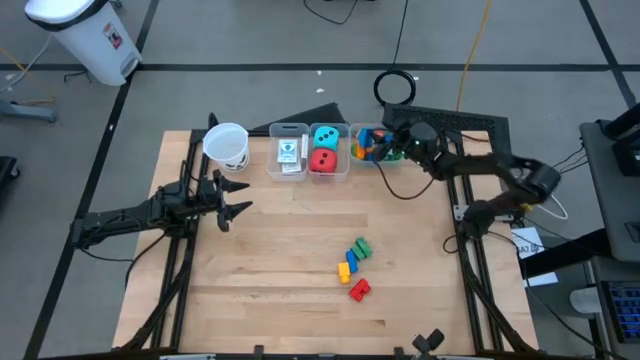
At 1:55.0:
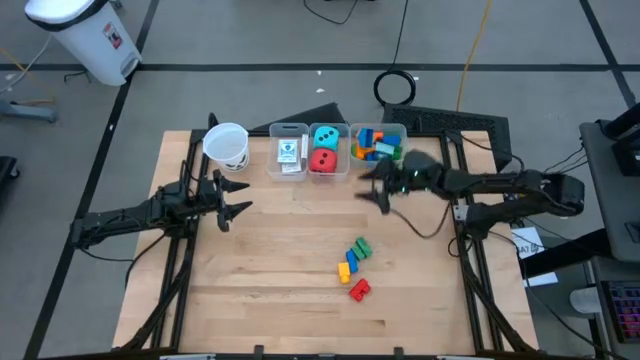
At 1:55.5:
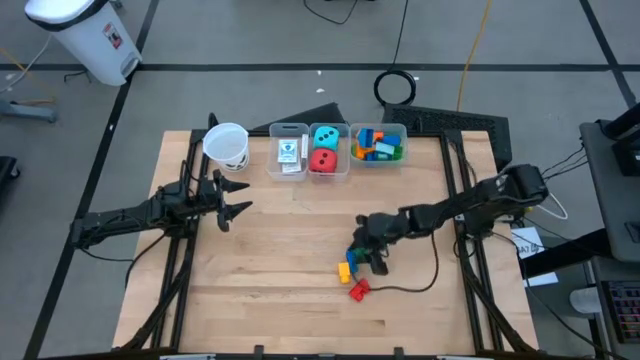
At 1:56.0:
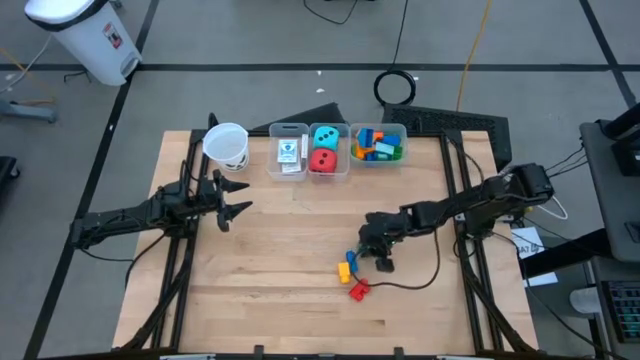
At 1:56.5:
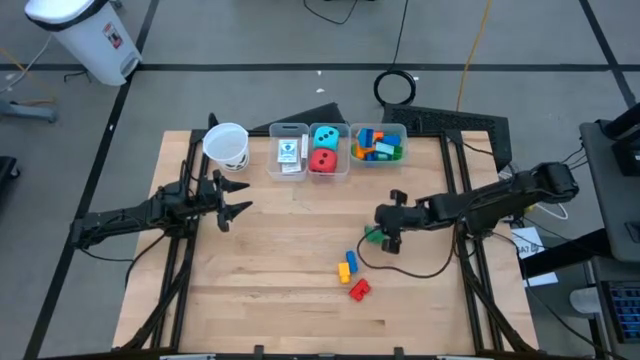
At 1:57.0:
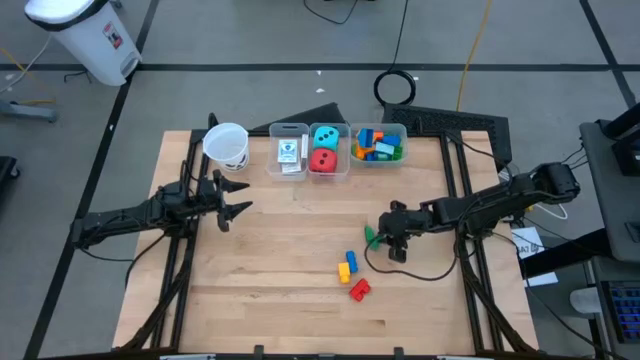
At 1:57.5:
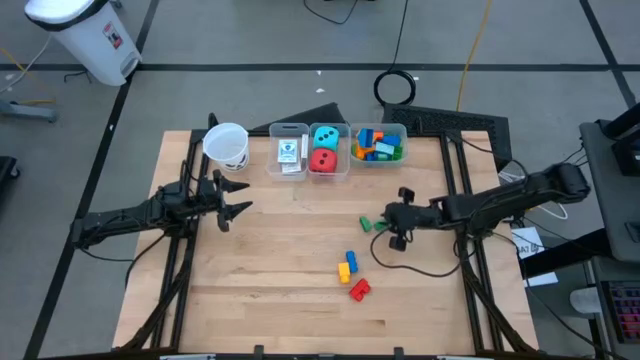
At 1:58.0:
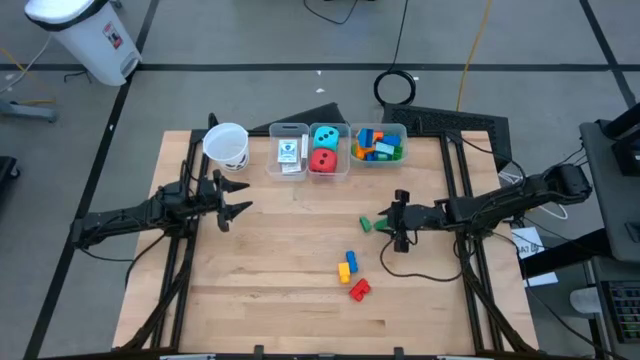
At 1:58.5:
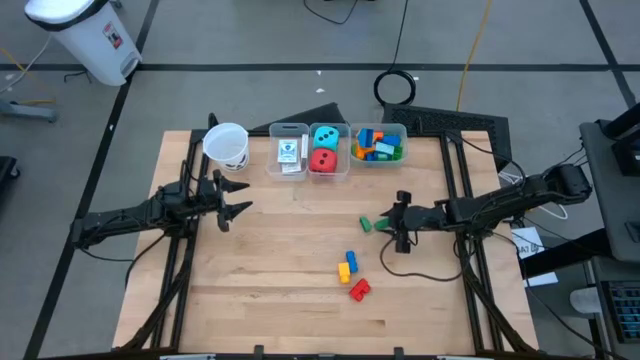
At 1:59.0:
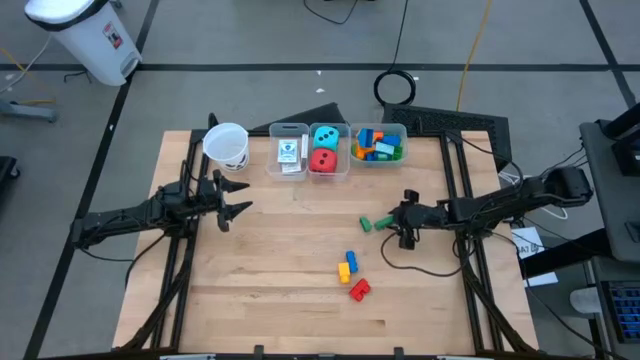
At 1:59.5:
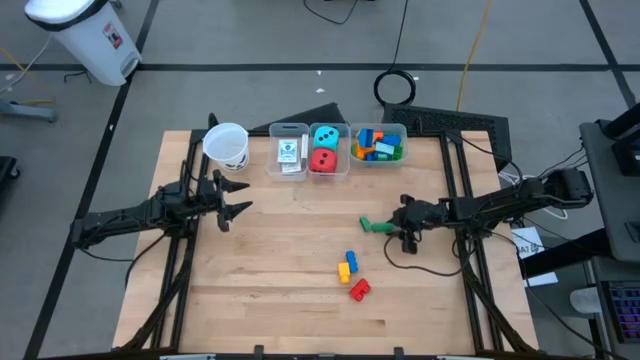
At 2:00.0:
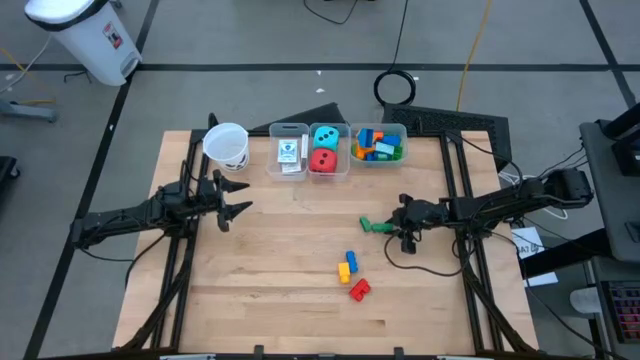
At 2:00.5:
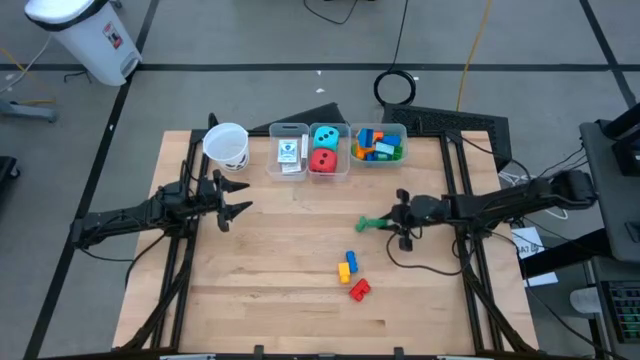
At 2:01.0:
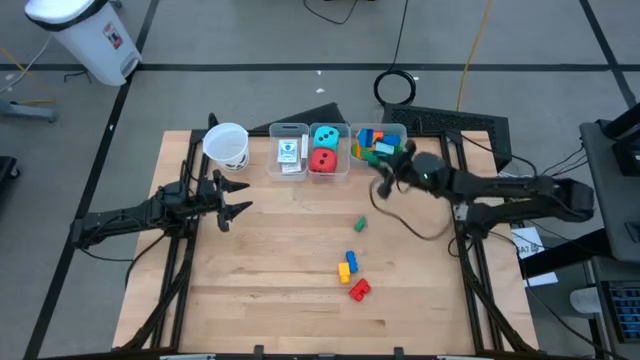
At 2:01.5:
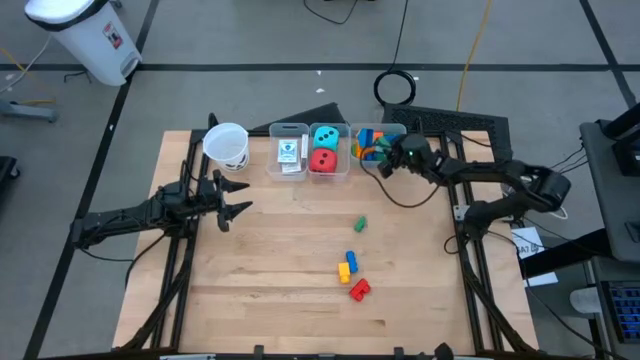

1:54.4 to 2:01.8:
Task: Pick & Place Toys
Put the green game piece into the right transparent bin

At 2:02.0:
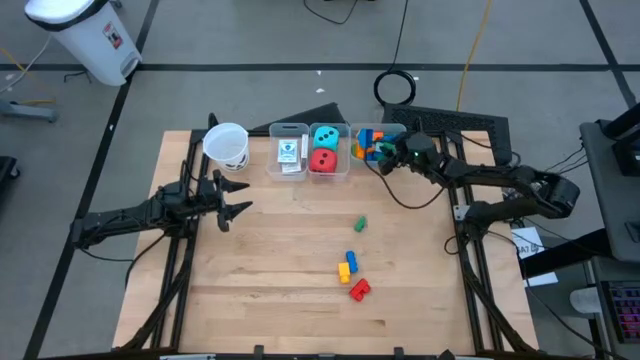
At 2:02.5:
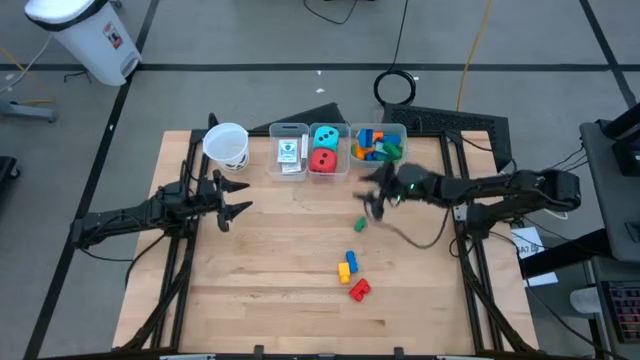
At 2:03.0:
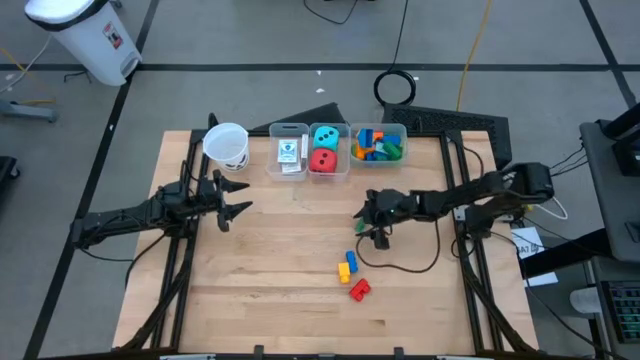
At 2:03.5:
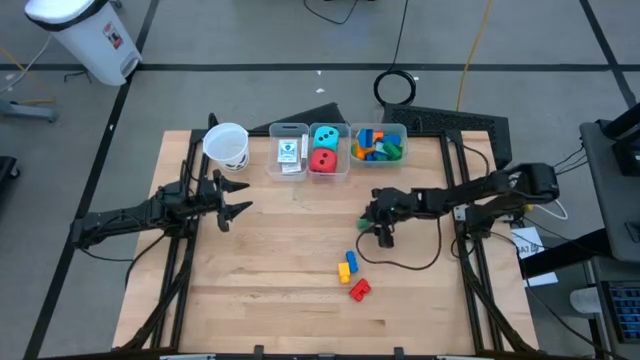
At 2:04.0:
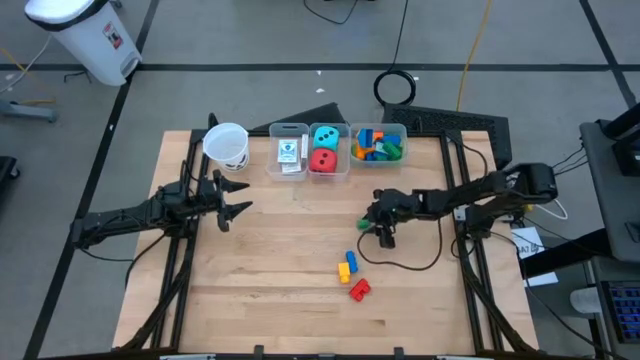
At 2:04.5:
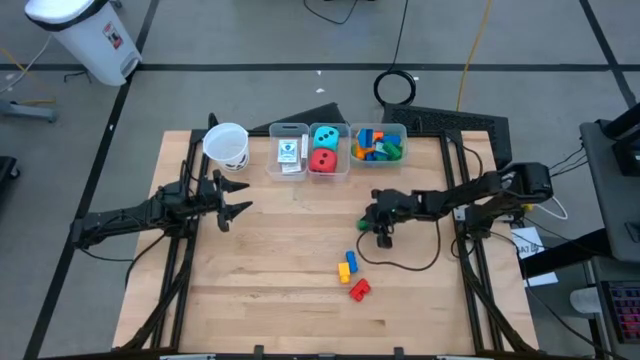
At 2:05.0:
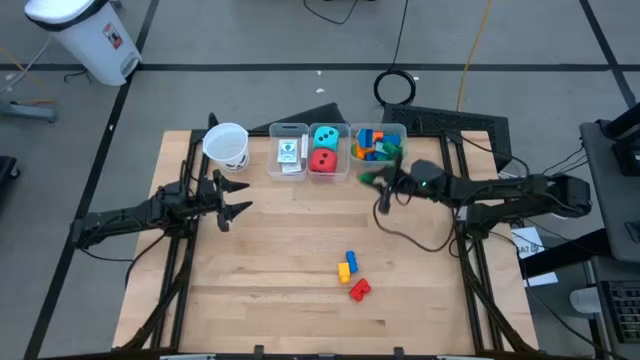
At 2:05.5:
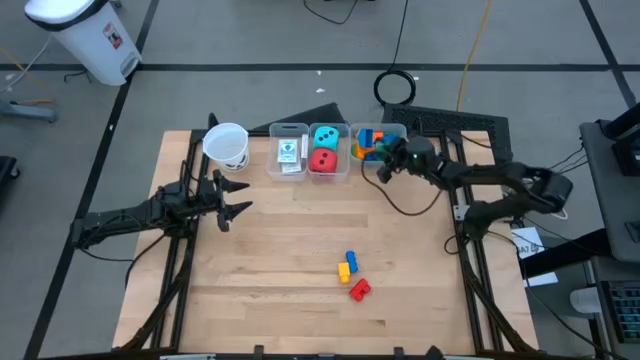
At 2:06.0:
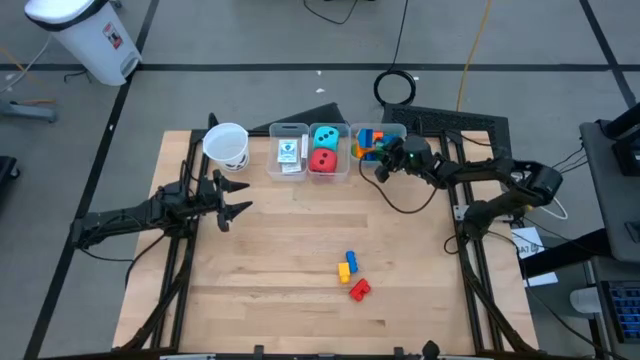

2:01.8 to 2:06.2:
Put the green game piece into the right transparent bin

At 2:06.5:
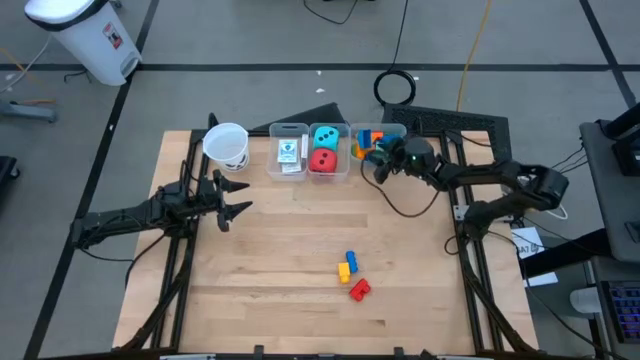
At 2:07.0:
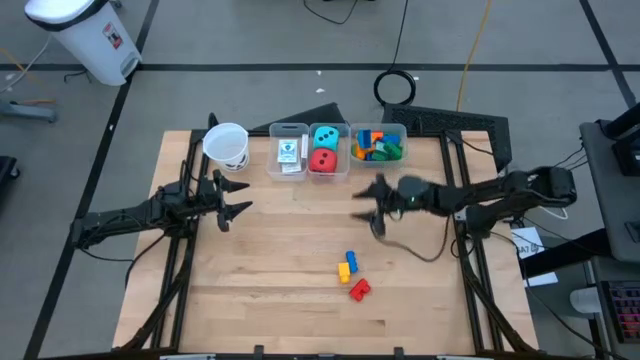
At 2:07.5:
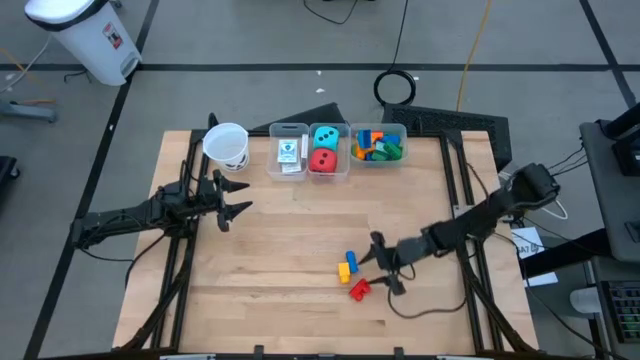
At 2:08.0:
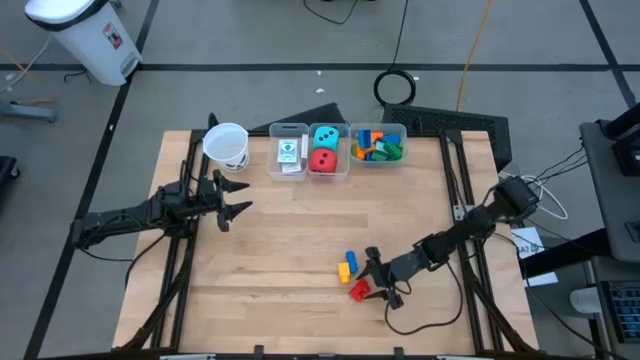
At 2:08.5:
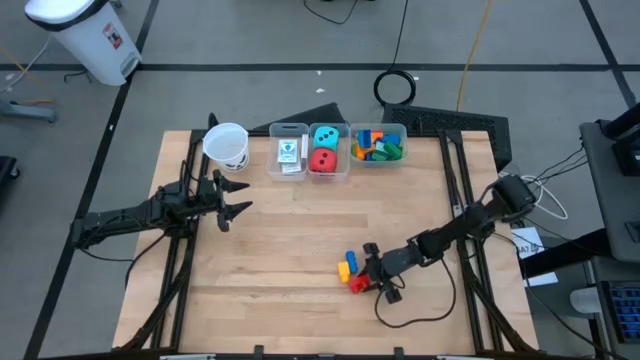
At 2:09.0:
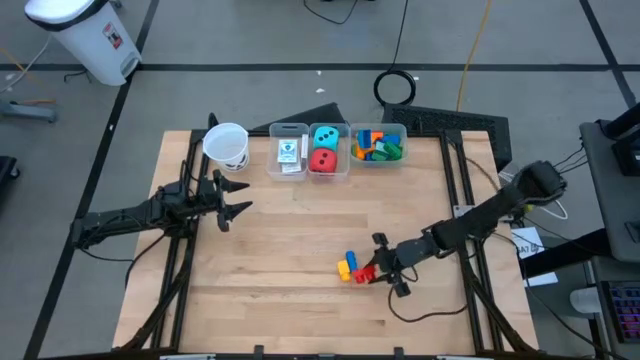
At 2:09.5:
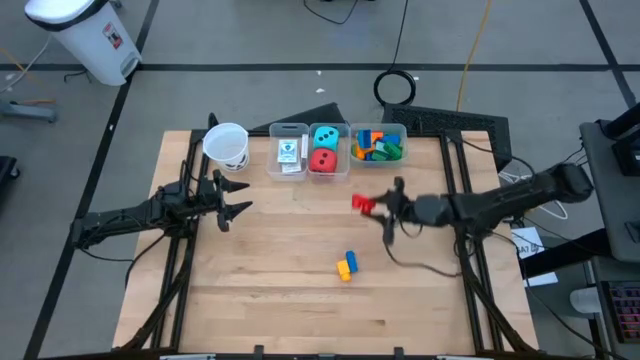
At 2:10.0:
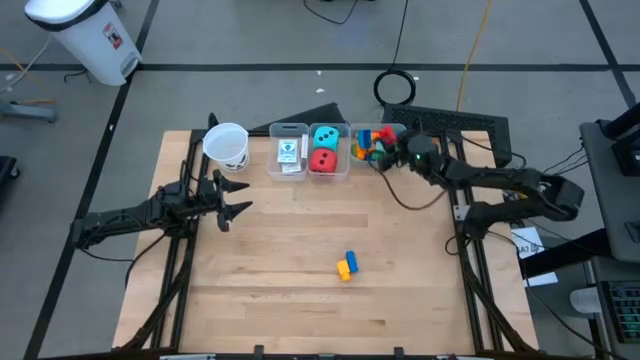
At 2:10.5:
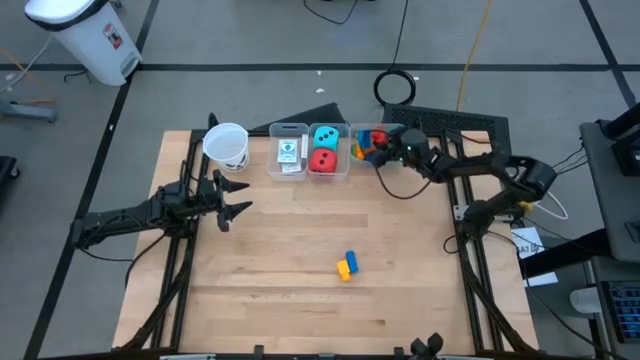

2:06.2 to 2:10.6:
Put the red game piece into the right transparent bin

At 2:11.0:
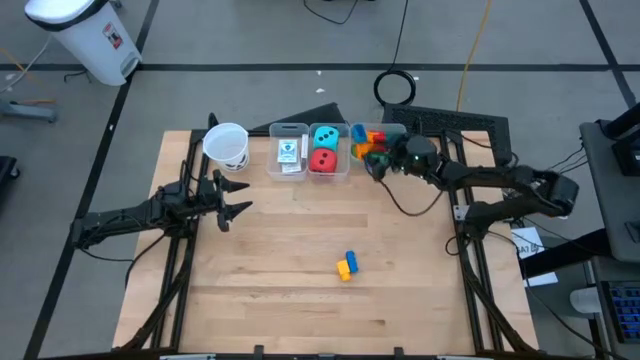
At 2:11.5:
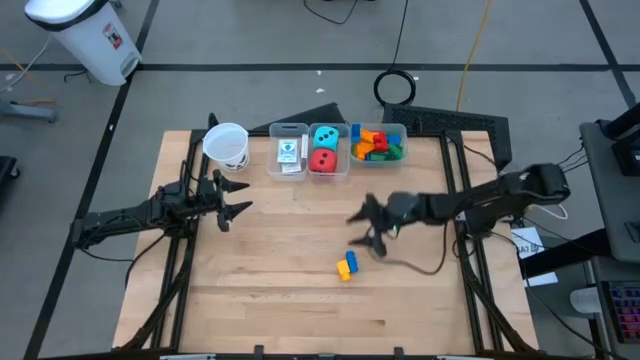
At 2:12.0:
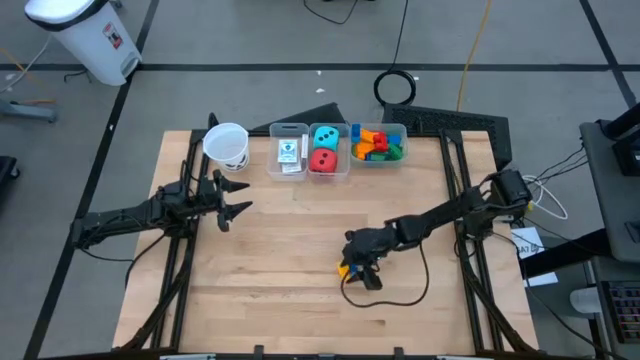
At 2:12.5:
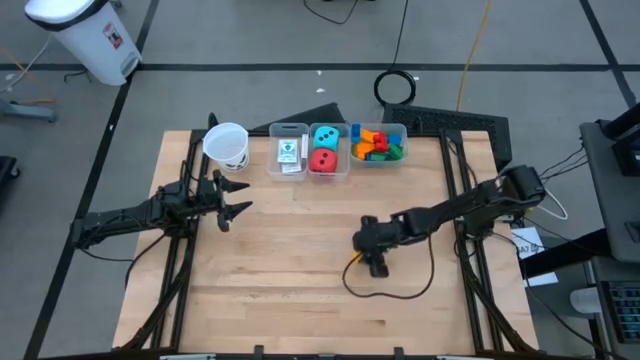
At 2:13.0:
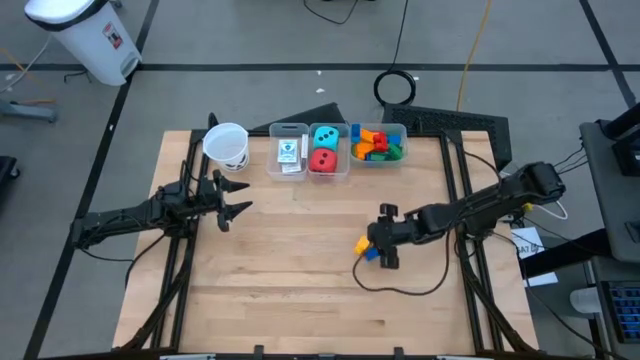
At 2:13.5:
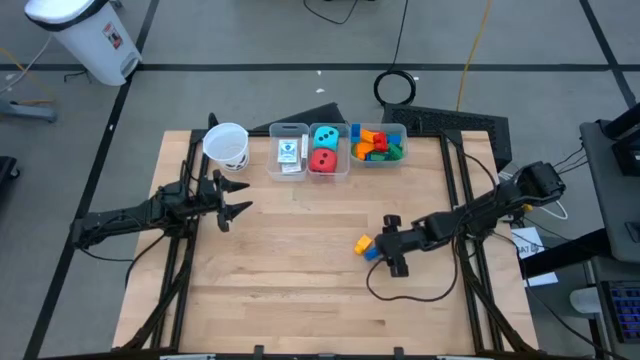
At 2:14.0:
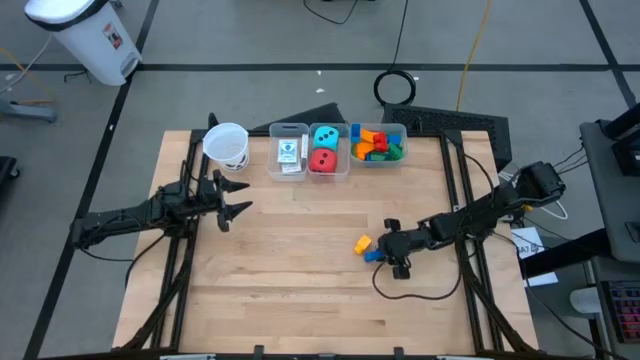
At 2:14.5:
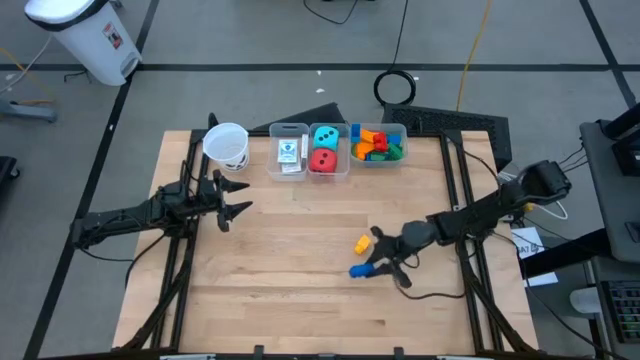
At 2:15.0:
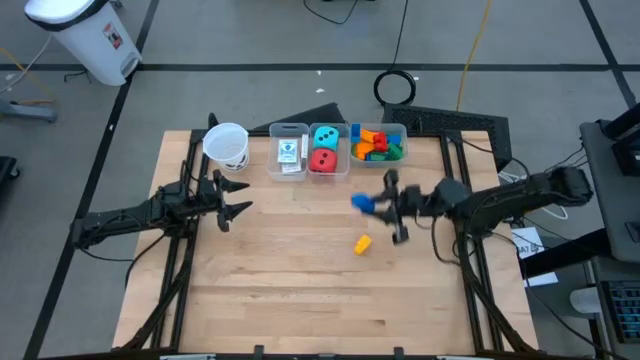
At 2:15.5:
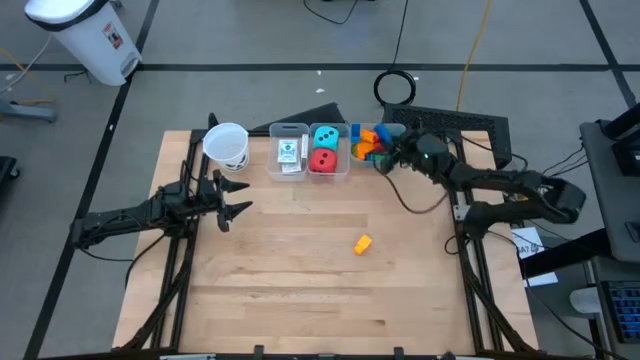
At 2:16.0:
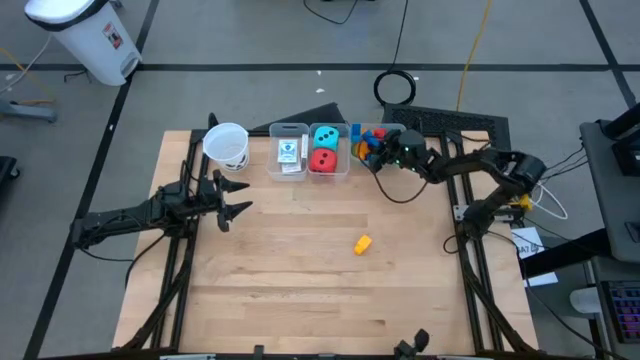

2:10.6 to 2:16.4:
Put the blue game piece into the right transparent bin
